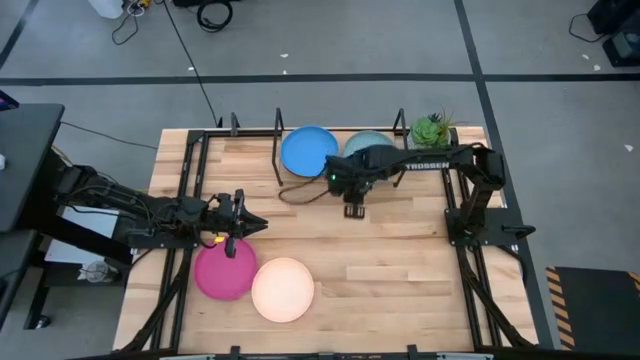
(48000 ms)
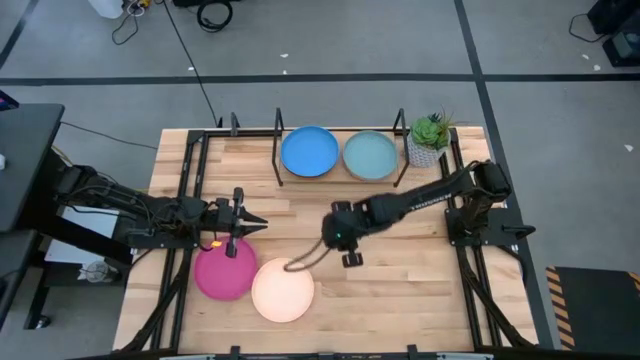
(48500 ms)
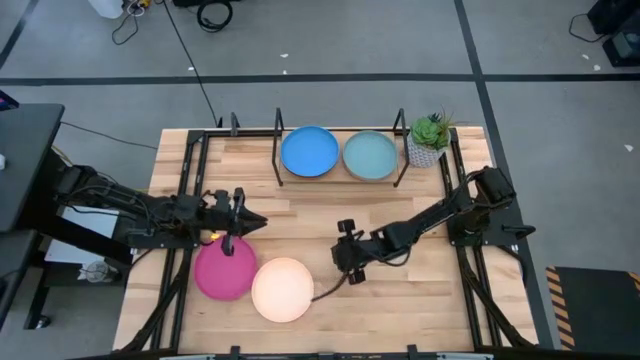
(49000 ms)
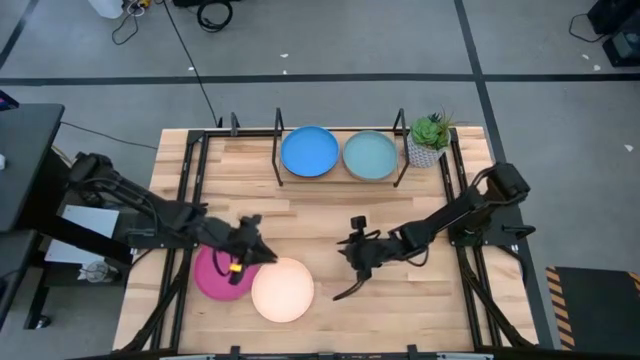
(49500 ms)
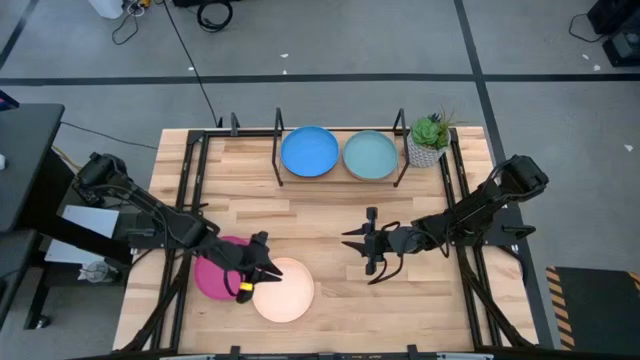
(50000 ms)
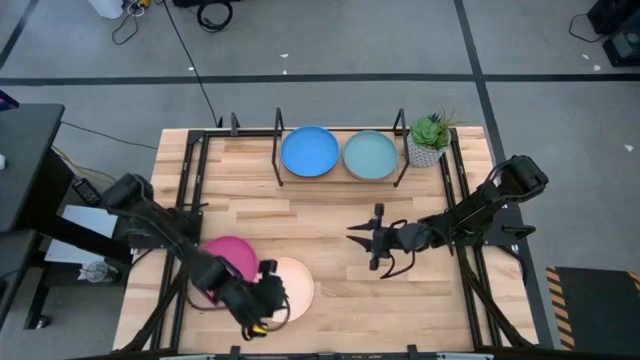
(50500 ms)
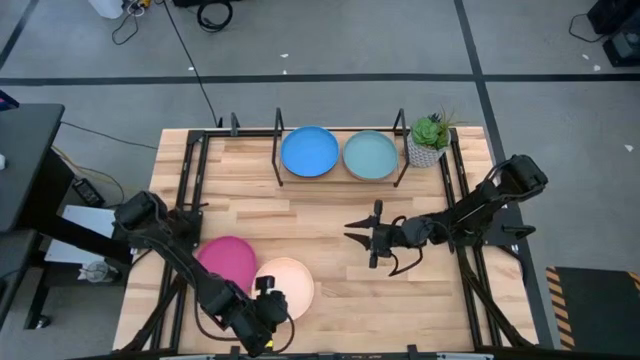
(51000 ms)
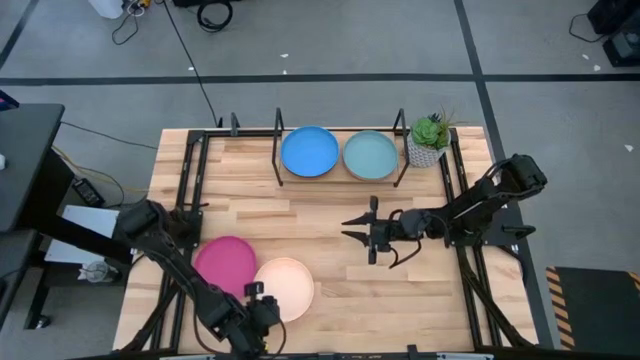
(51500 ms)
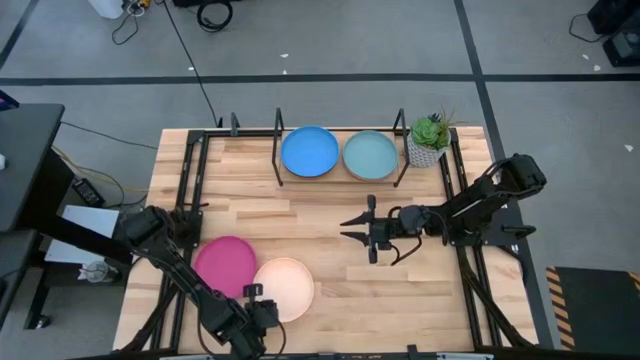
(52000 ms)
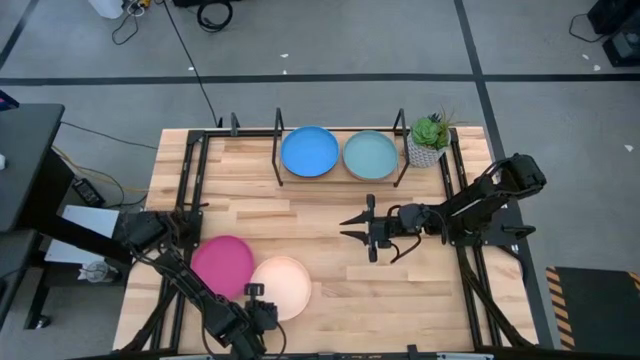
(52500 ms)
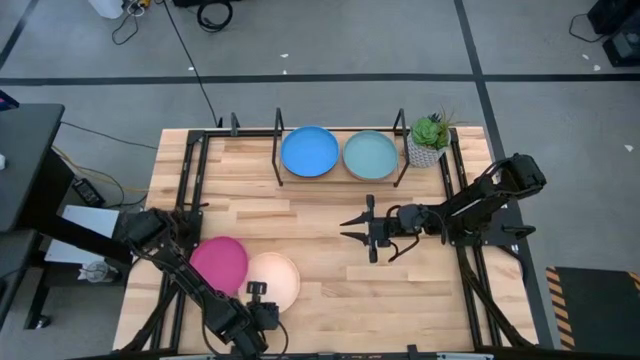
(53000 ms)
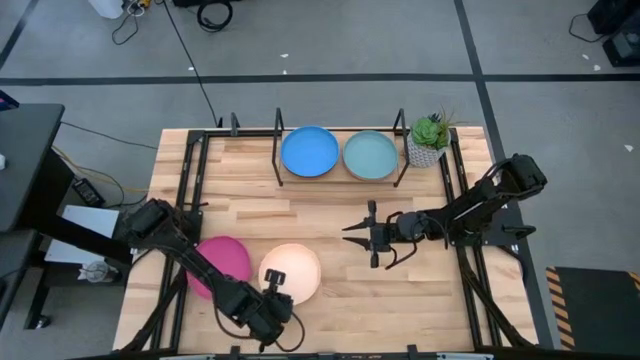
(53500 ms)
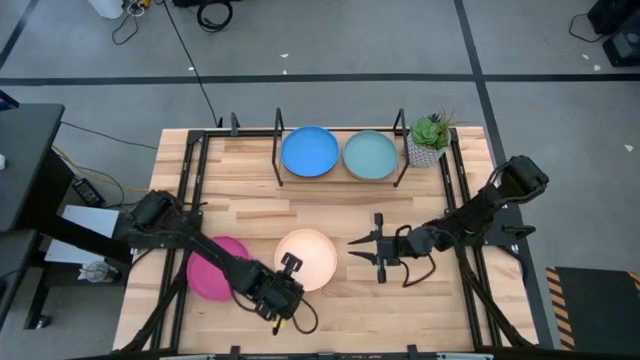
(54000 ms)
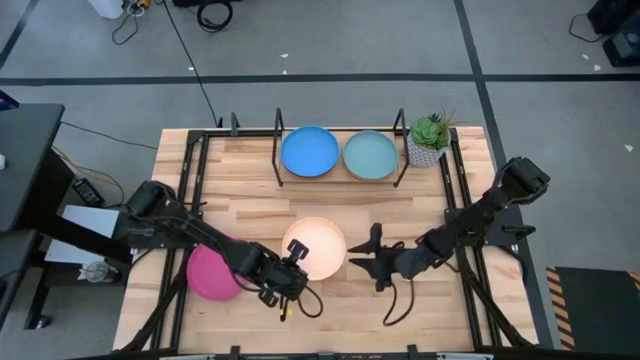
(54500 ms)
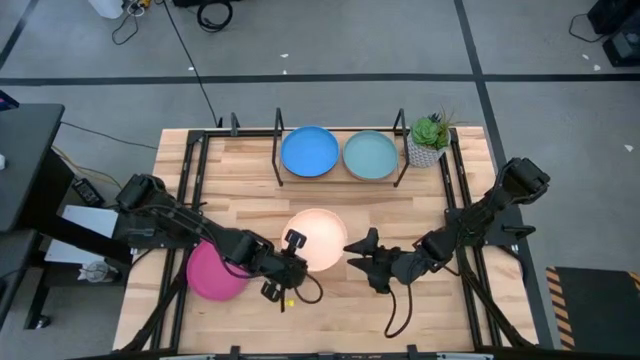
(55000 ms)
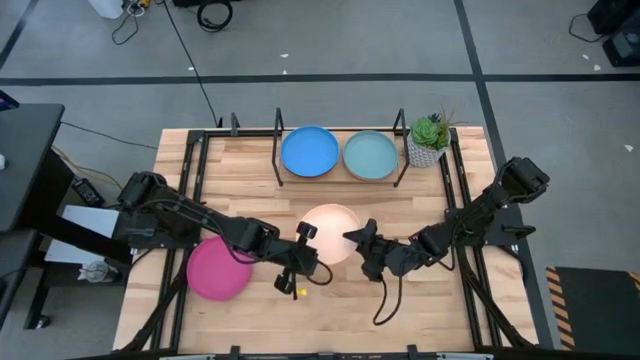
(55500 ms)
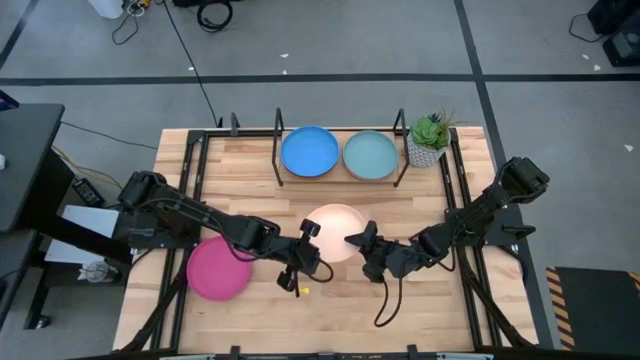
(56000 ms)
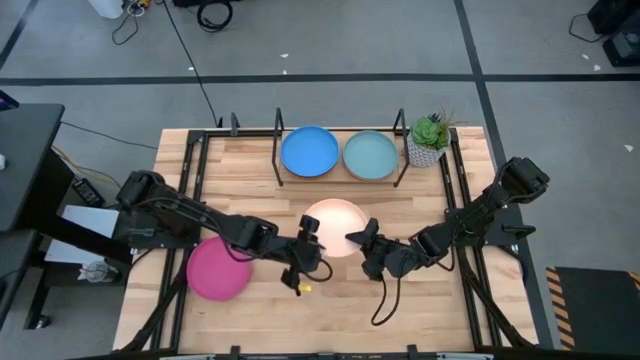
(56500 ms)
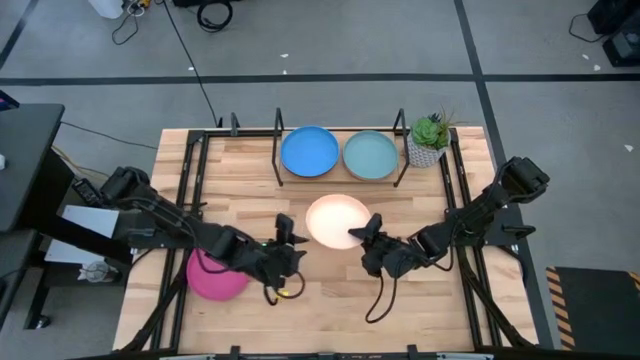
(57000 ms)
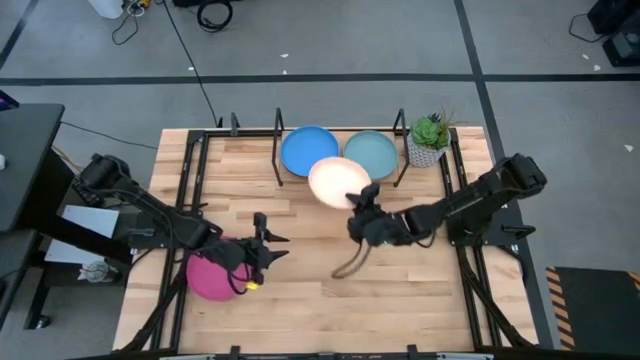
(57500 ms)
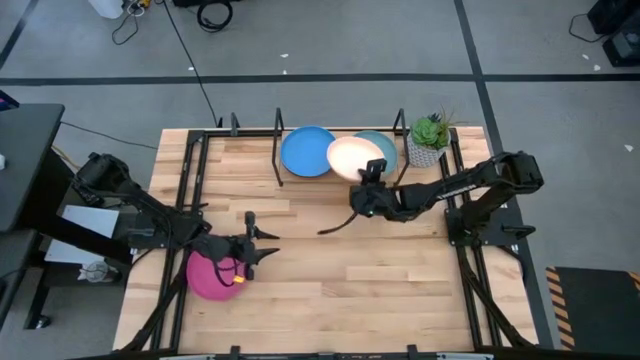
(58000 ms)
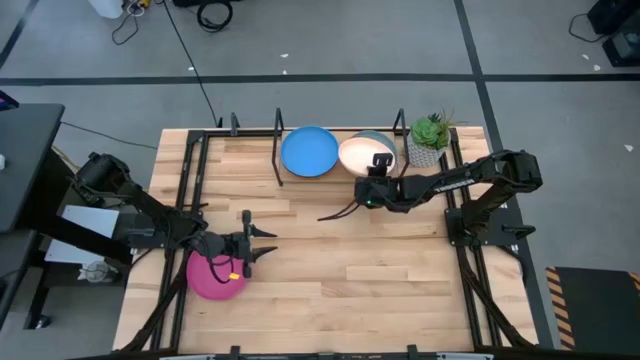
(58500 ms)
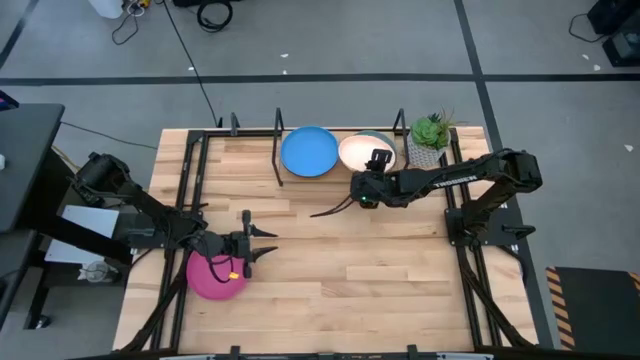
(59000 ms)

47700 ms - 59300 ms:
Task: Place and stack plates onto a shelf
Stack the beige plate on the top of the stacked plates on the shelf

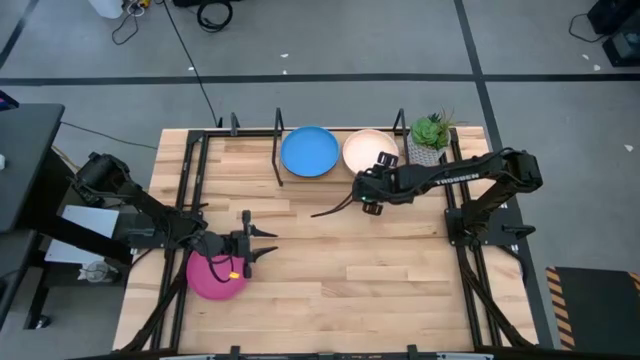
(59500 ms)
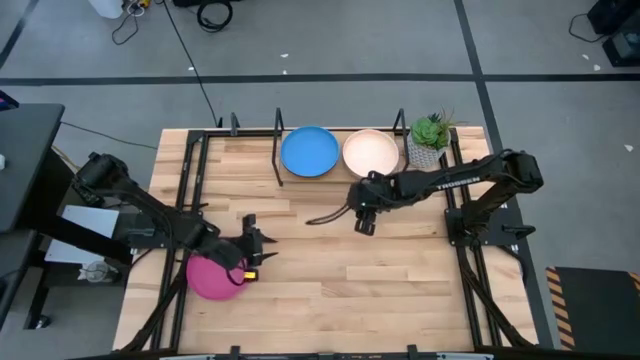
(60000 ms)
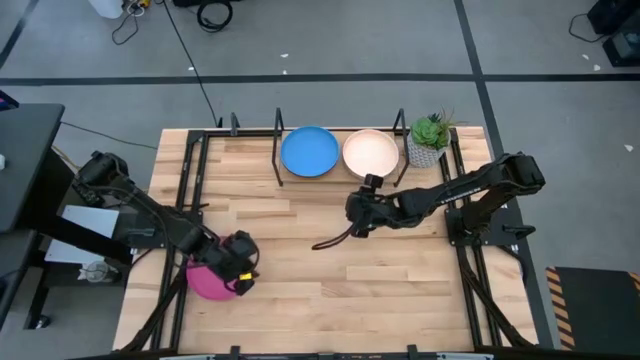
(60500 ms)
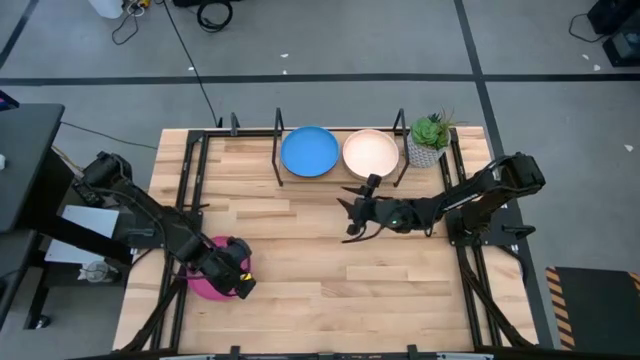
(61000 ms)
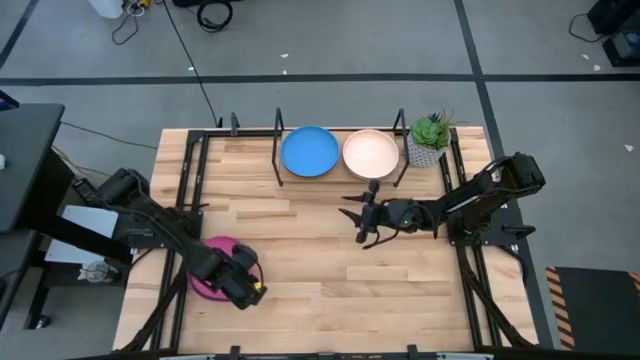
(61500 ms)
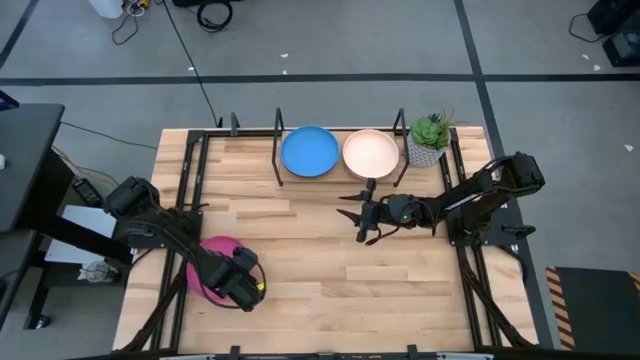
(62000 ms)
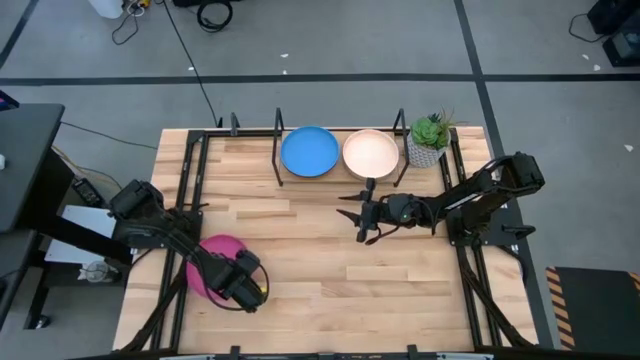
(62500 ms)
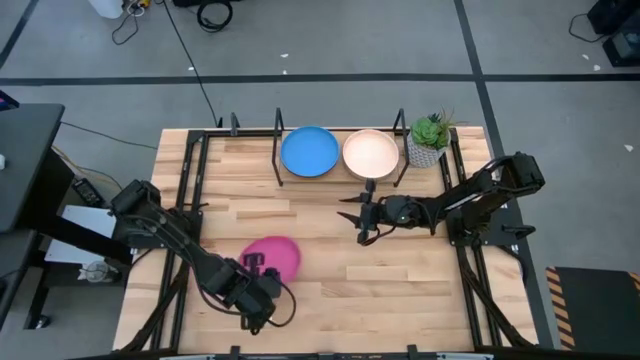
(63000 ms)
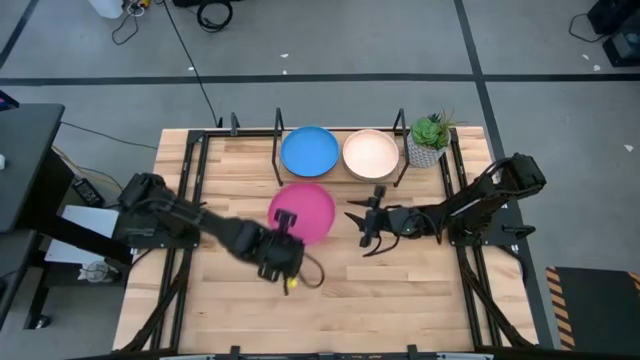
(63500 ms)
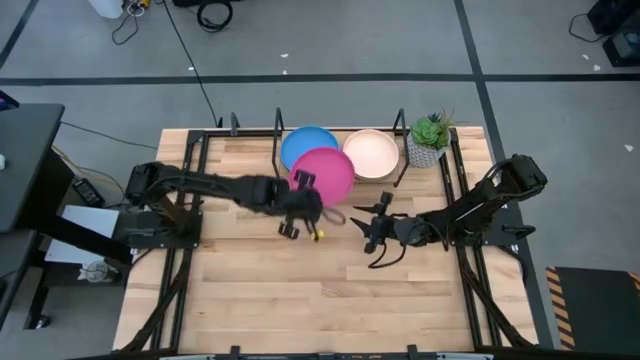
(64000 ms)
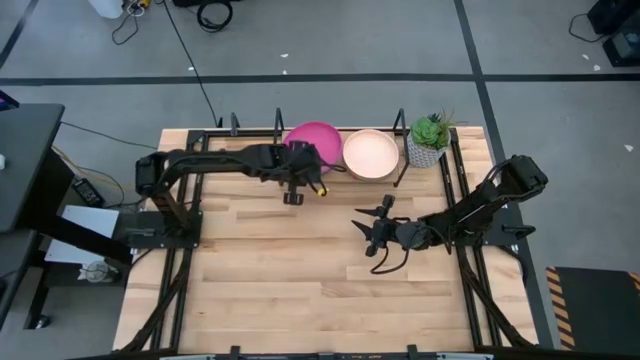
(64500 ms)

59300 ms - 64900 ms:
Stack the pink plate on top of the stacked plates on the shelf

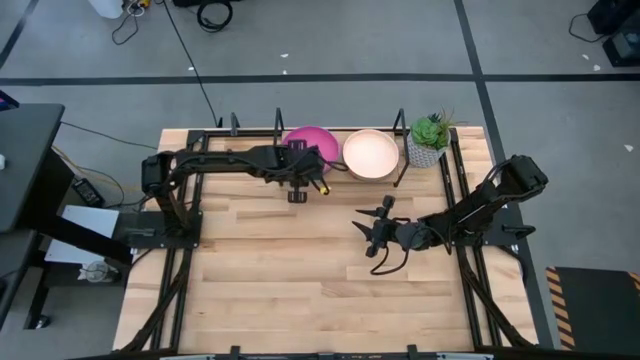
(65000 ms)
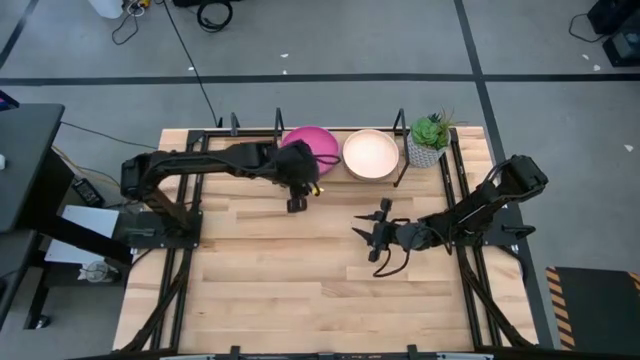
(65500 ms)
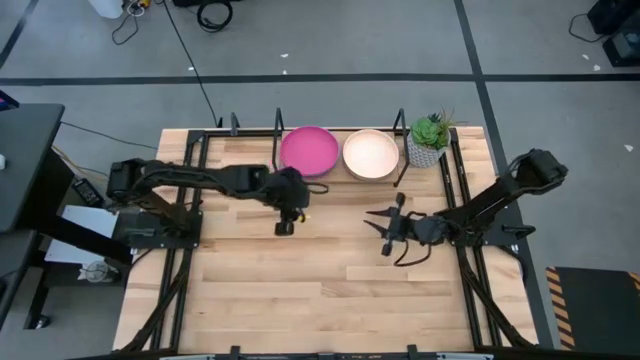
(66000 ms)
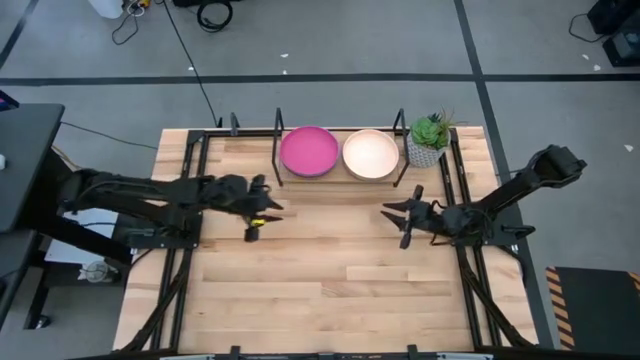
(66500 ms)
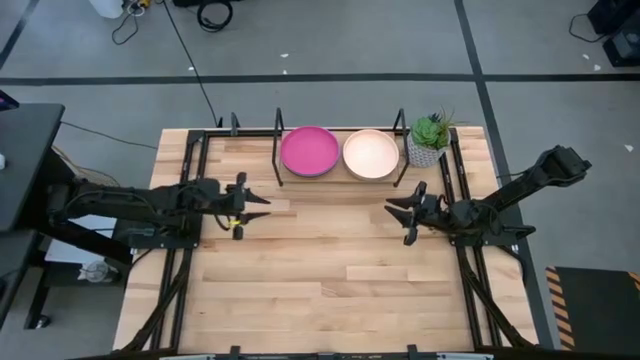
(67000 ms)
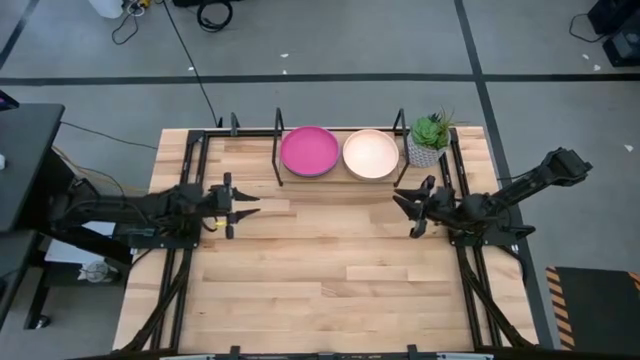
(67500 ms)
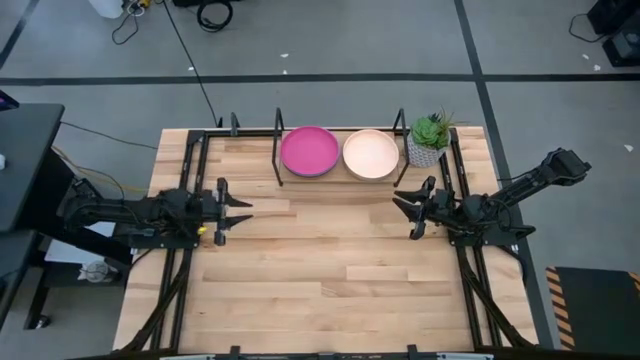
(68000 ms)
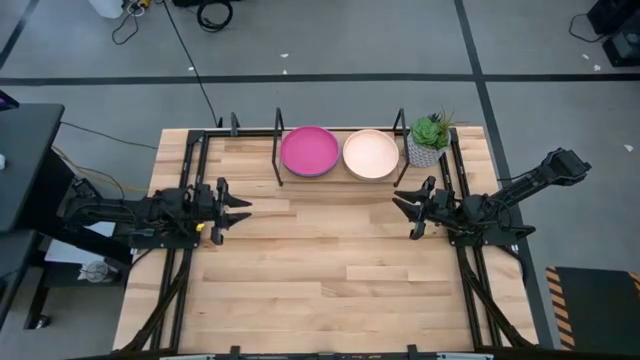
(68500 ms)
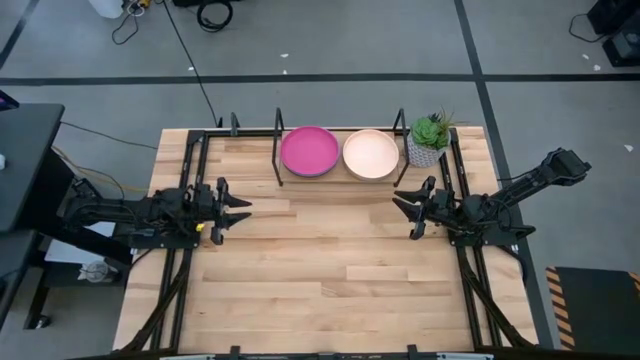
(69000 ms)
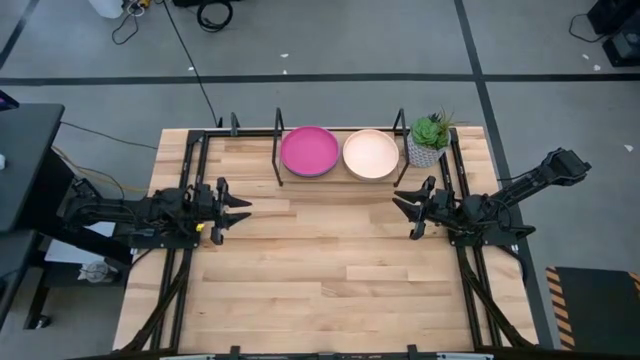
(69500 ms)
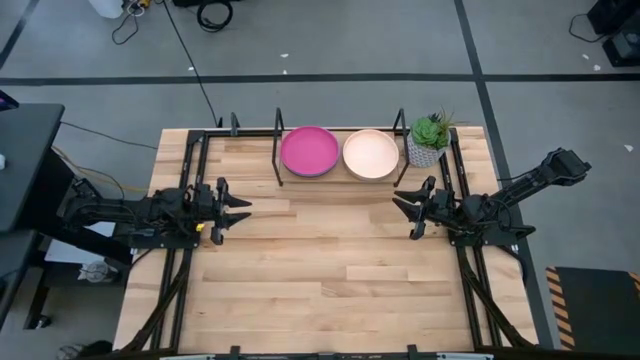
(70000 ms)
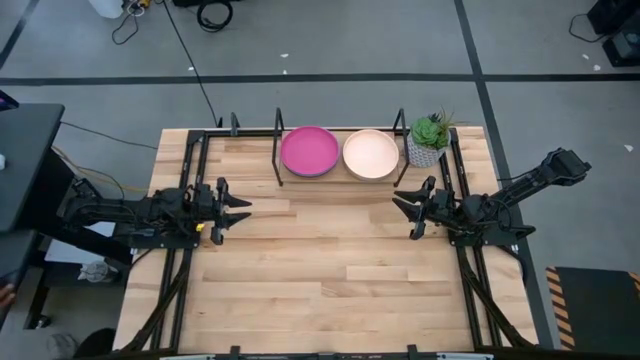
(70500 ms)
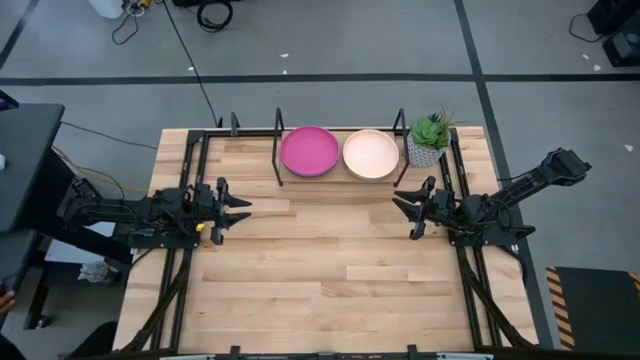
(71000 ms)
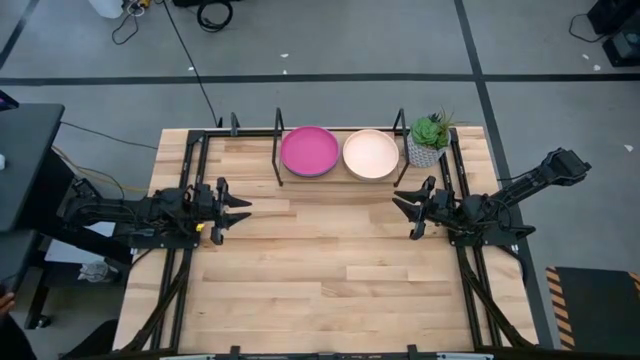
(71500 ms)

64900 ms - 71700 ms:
Return to Home Position
